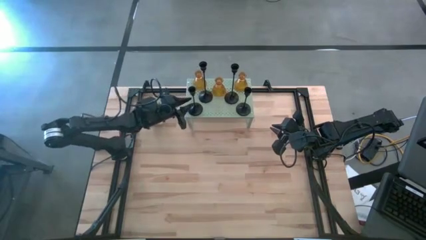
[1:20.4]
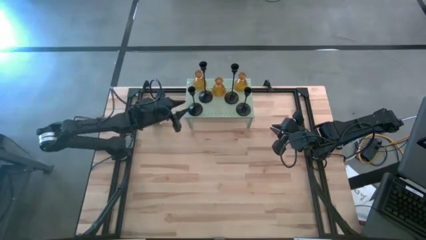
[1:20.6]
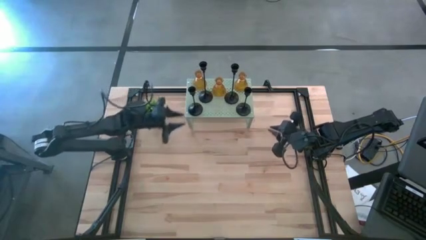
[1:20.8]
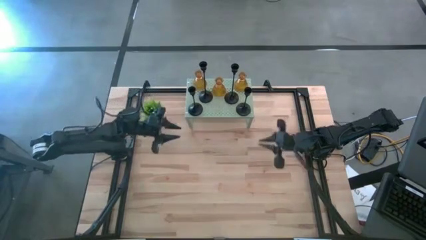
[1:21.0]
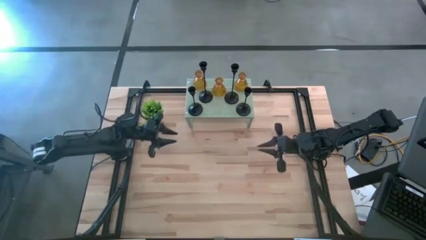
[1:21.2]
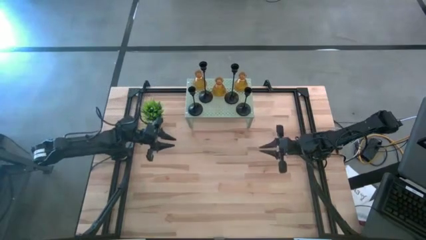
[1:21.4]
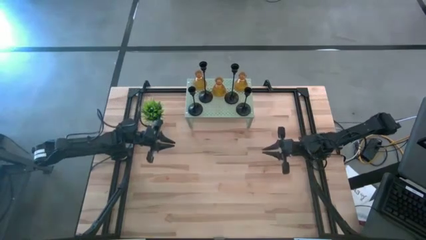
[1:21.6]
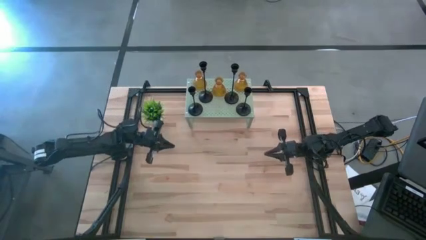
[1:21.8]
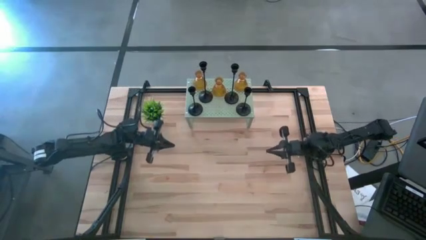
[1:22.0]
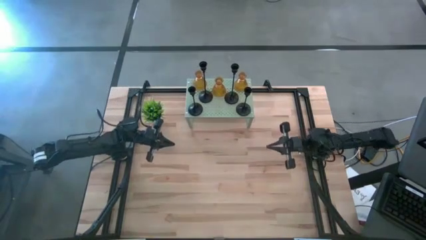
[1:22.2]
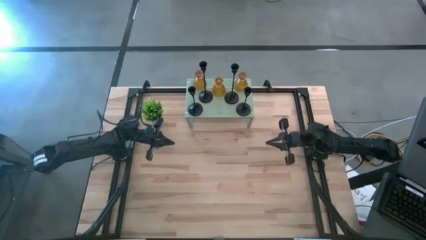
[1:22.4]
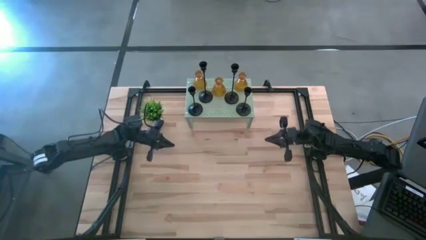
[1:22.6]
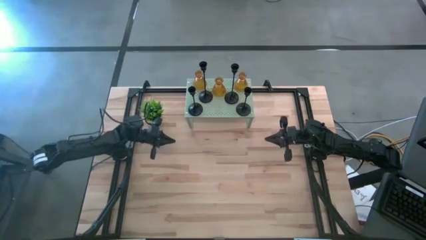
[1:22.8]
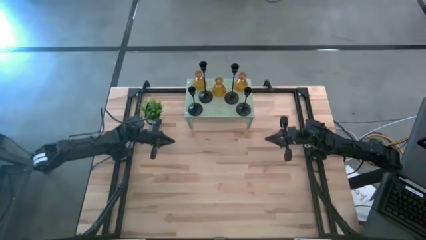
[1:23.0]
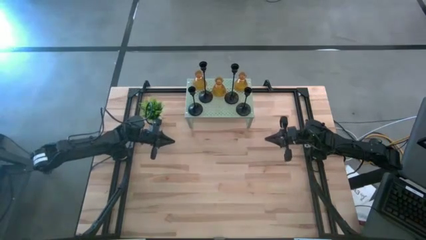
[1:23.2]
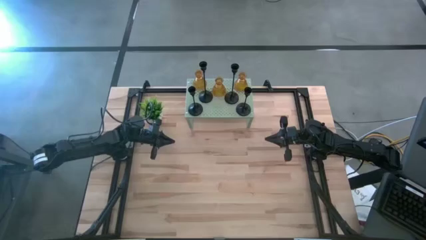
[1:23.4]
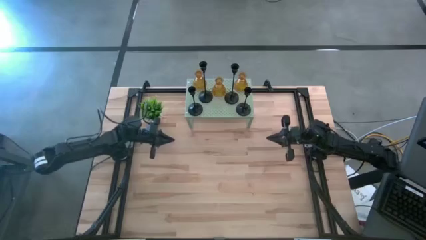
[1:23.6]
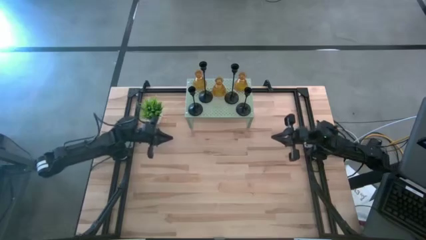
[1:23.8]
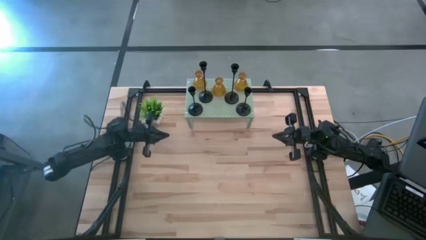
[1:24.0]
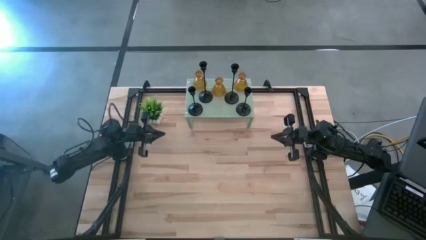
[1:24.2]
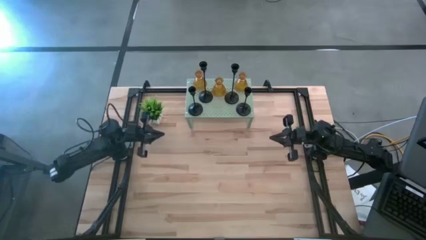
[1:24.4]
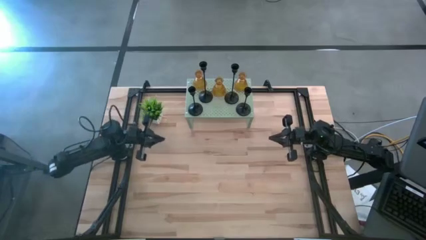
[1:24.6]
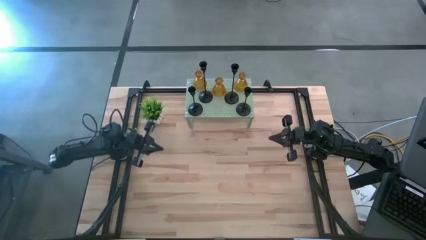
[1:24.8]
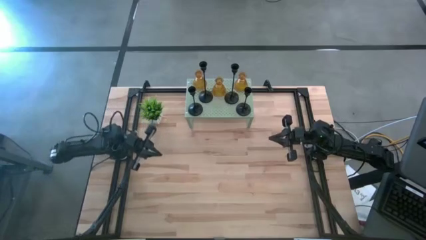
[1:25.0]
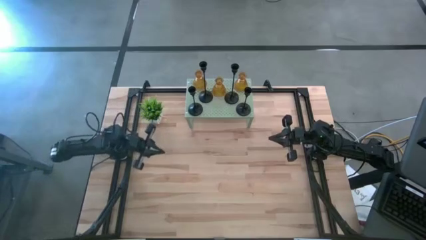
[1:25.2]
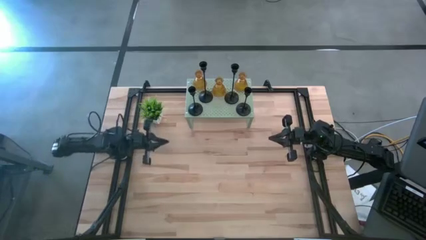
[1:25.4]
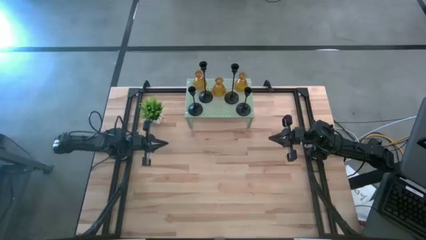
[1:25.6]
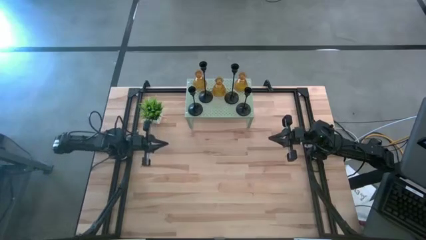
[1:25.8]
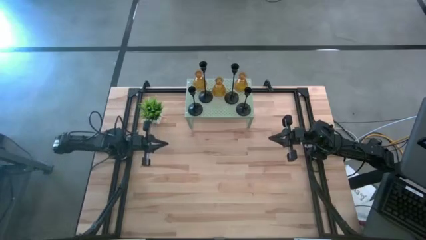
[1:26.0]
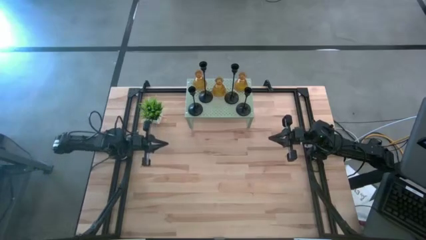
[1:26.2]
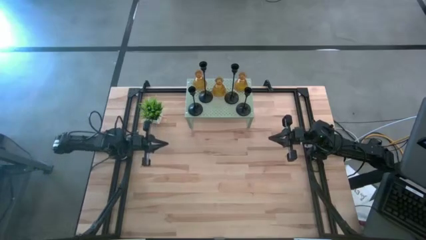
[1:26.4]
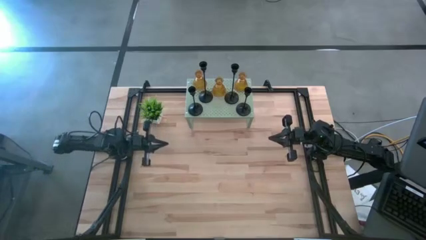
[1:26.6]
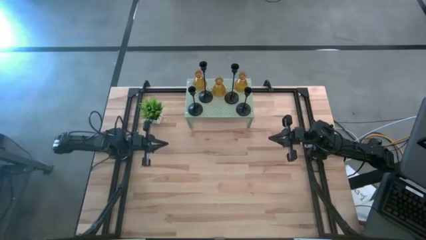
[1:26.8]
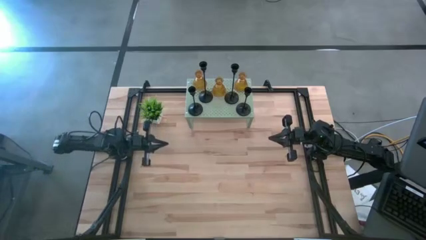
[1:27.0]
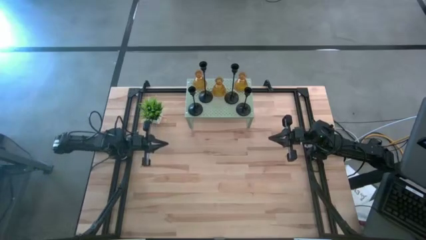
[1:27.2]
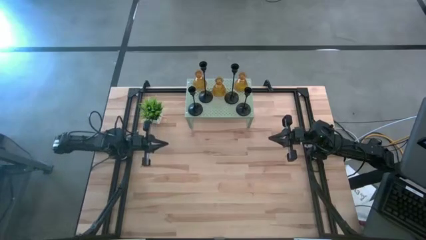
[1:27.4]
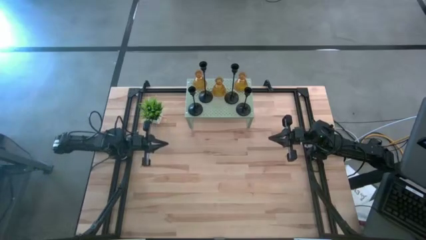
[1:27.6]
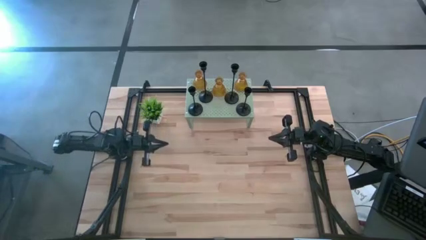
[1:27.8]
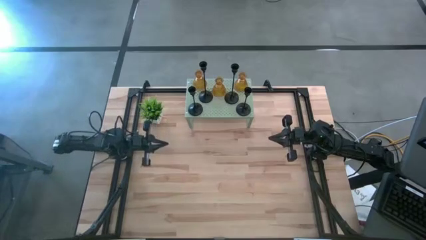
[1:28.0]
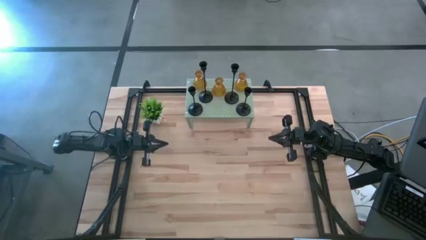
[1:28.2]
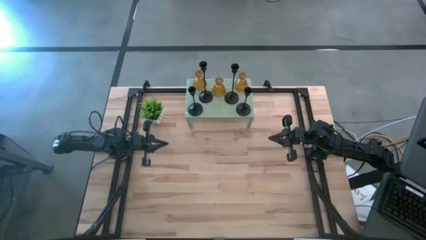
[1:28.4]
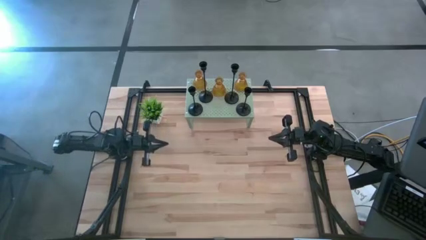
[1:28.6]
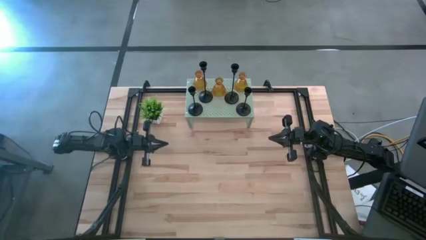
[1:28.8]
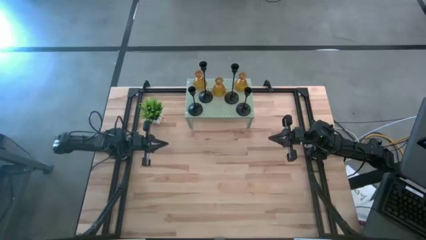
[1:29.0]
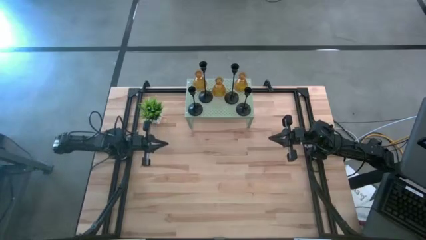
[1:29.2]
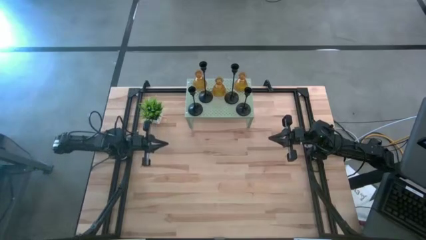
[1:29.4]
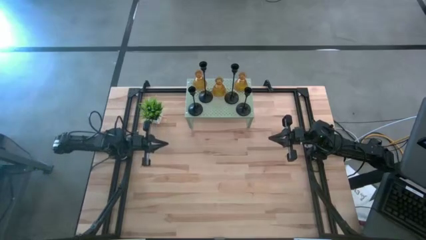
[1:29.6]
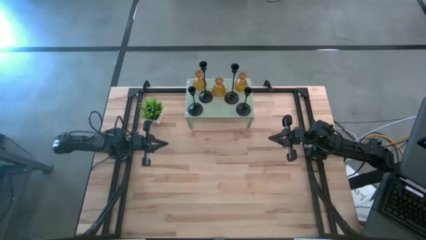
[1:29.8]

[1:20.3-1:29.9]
Task: Pick & Place candle stick holders
Return to Home Position

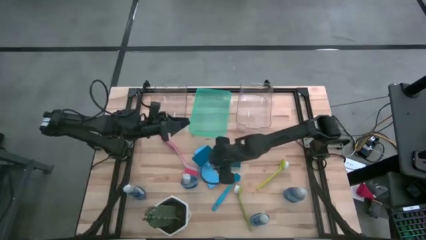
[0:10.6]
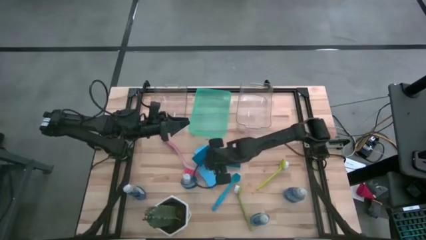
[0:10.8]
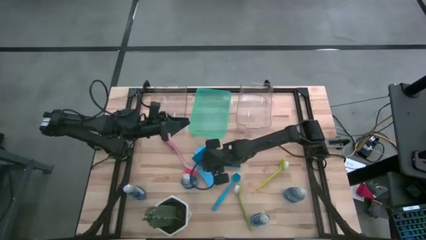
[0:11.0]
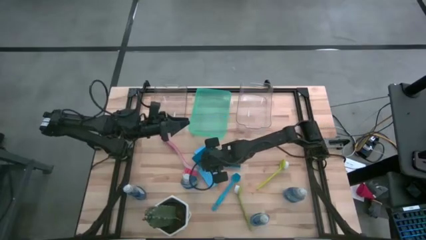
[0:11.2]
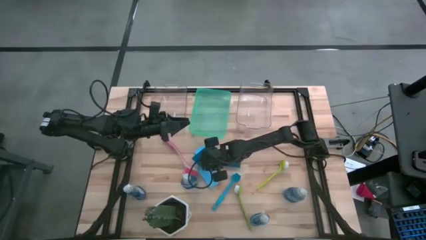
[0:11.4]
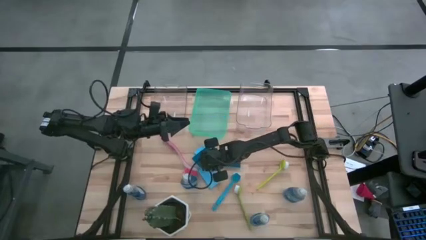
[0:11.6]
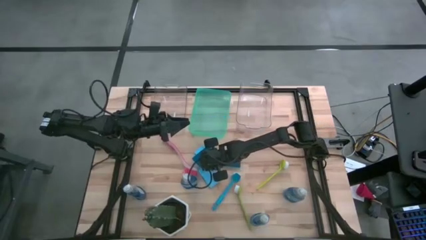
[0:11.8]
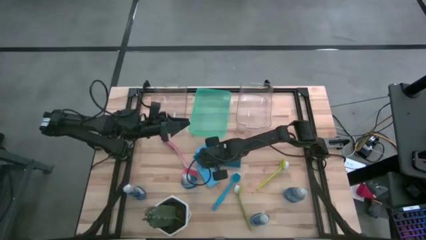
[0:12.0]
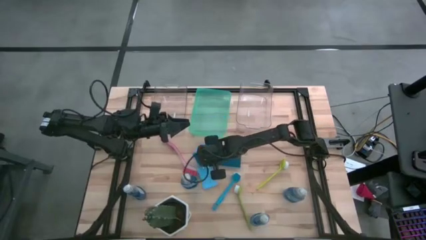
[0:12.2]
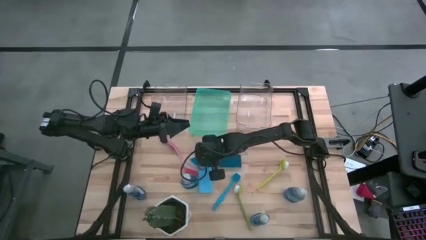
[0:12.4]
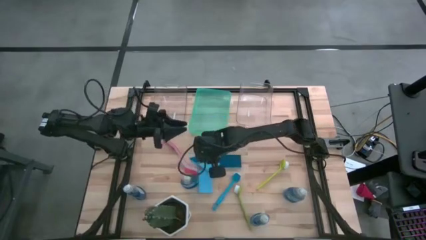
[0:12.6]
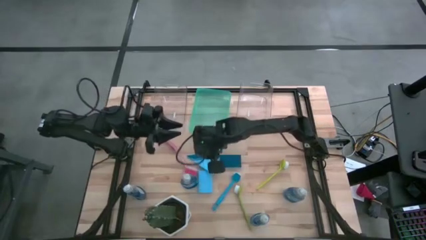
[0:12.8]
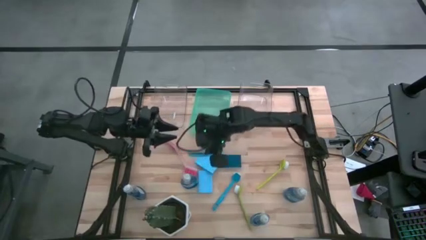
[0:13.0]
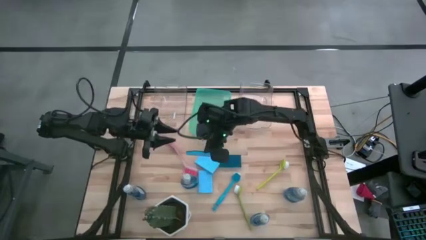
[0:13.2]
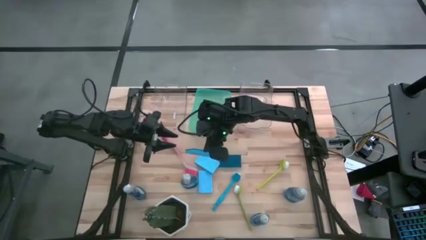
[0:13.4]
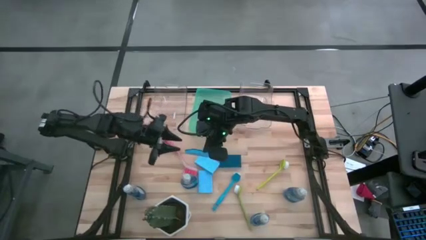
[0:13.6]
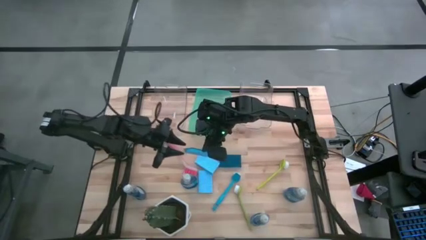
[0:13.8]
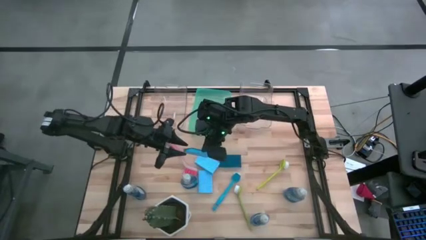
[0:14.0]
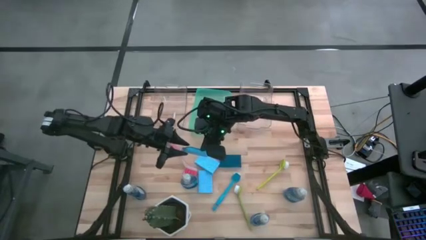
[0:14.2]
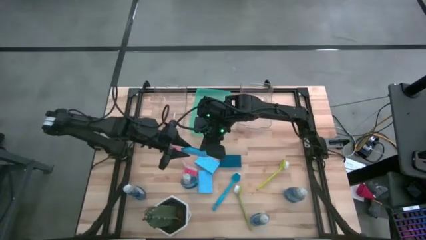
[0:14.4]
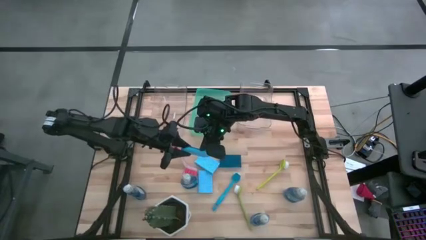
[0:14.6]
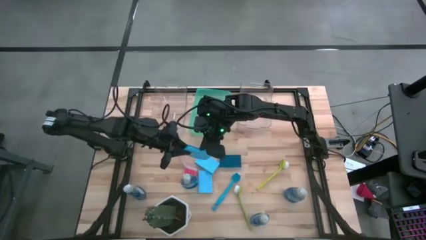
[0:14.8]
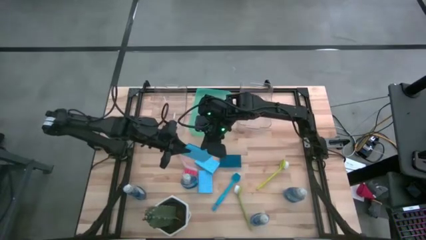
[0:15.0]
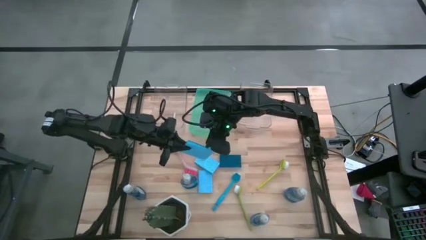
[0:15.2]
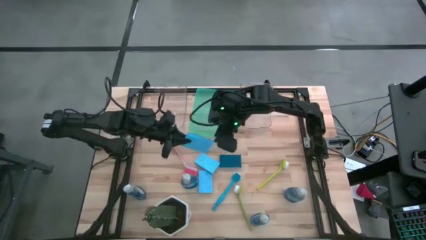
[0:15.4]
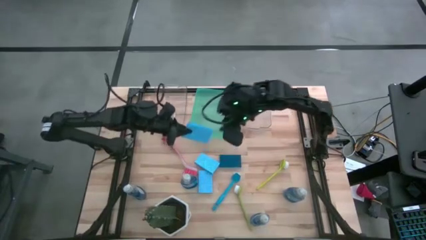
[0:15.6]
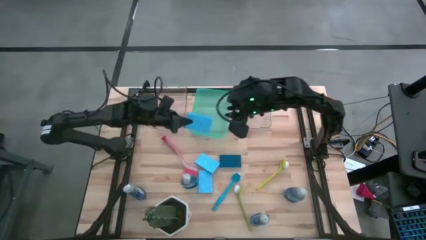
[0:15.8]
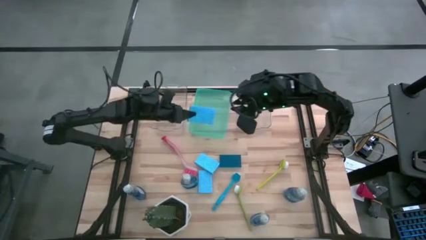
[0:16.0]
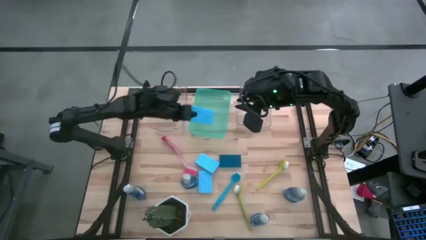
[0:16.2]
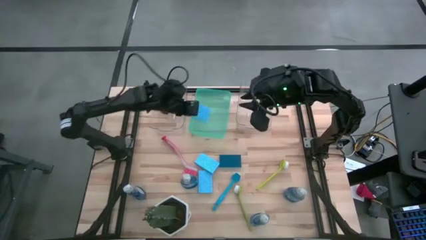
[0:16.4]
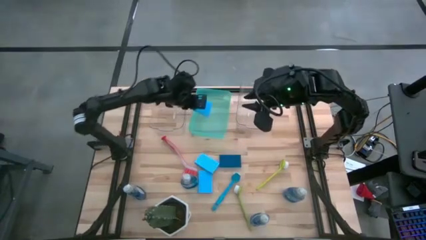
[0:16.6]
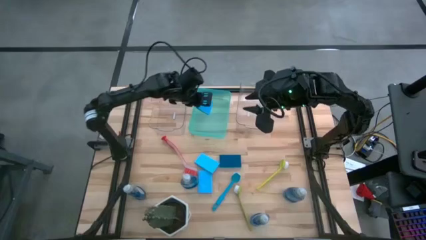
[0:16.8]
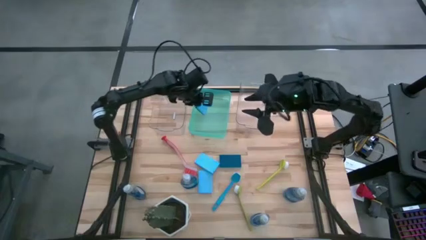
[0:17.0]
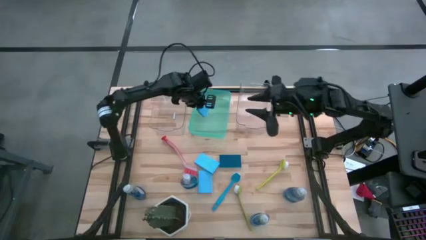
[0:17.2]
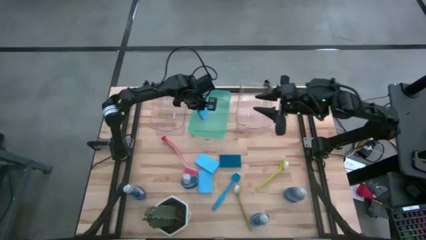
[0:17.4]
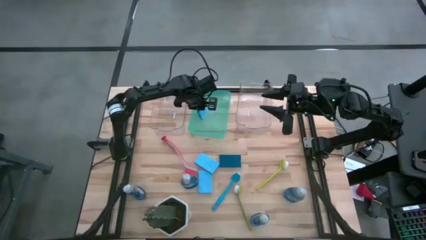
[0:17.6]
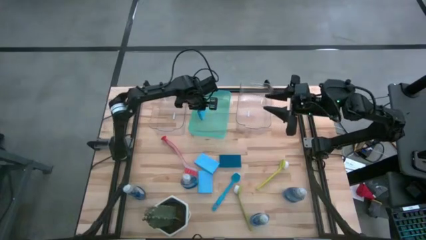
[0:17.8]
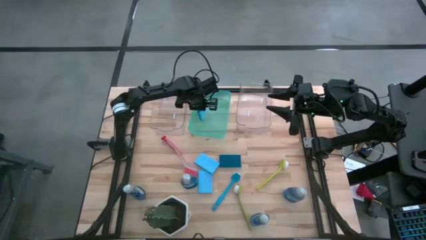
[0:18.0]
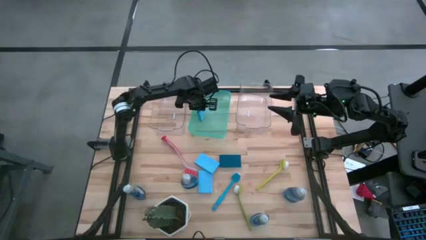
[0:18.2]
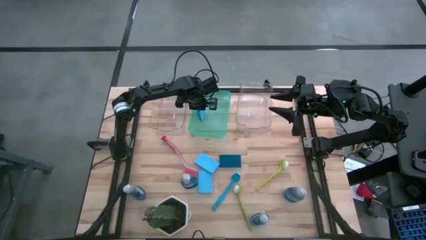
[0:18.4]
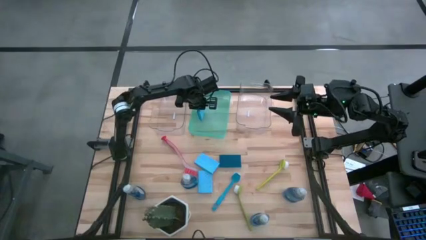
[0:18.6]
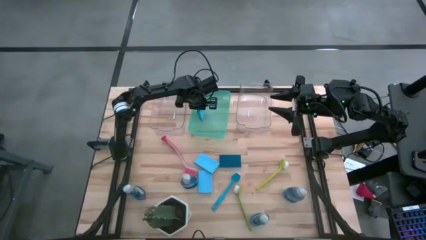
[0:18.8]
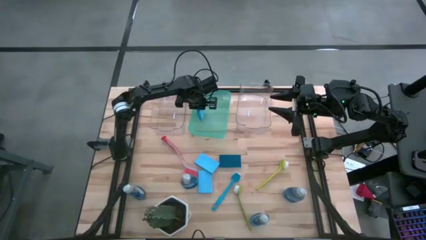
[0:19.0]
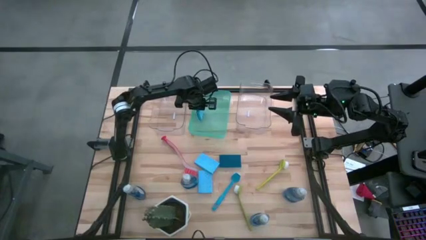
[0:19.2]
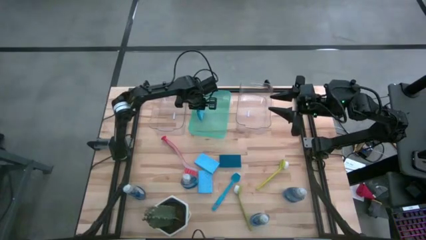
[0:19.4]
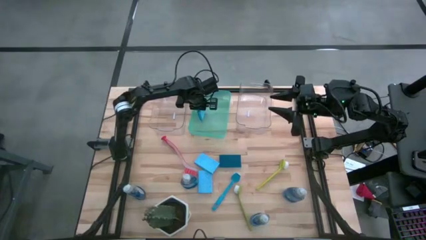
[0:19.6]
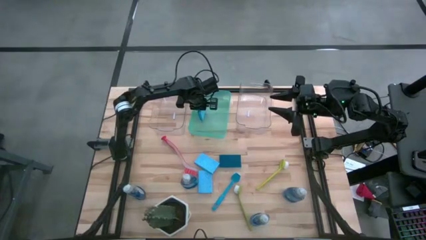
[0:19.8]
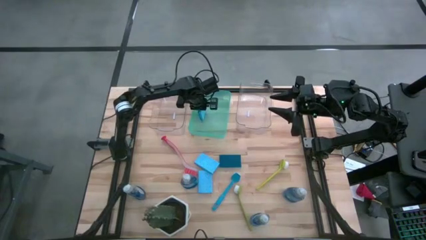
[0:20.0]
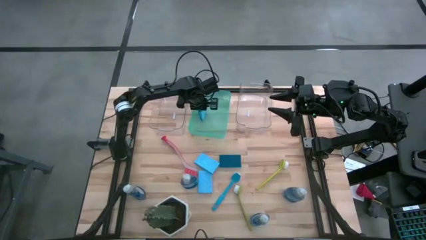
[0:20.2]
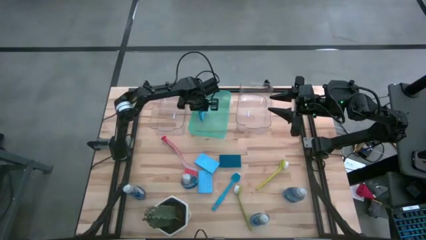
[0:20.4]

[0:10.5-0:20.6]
Task: Pick & Place Kitchen Sink Supplies
Put the sponge into the green bin
